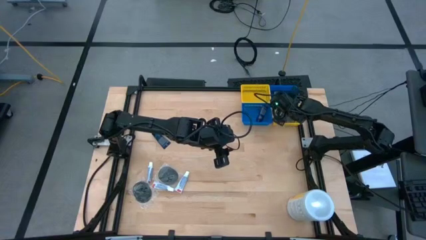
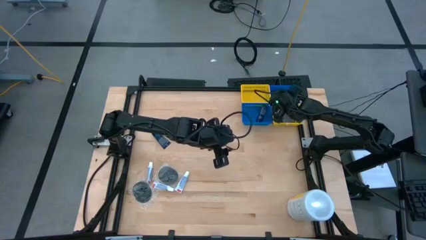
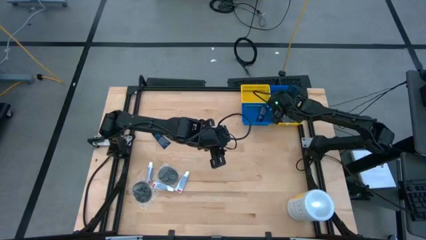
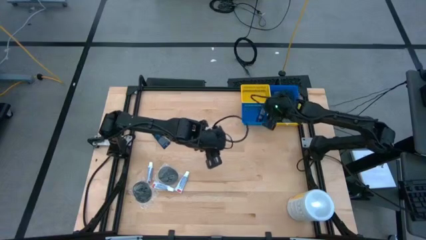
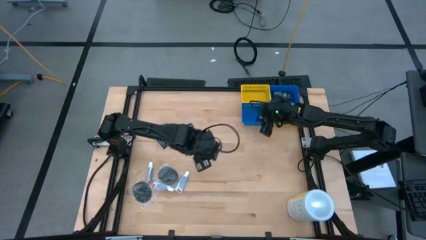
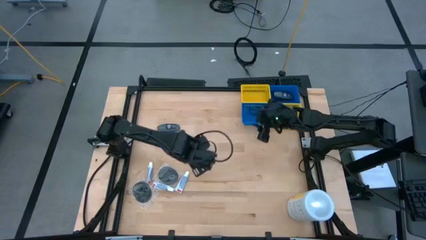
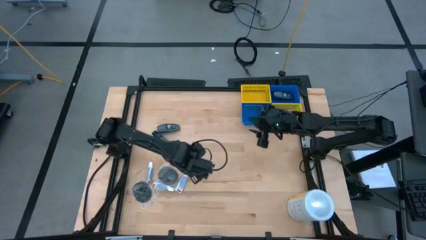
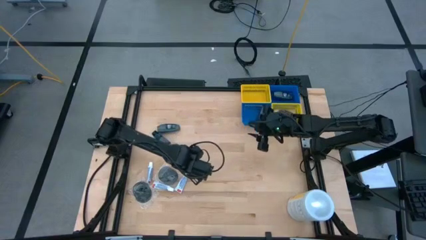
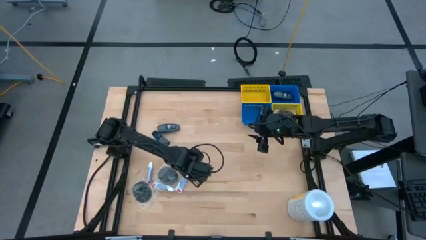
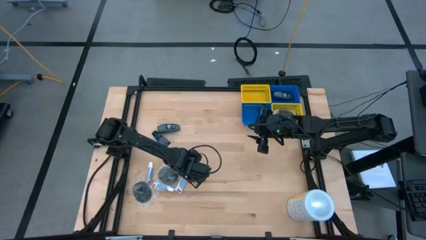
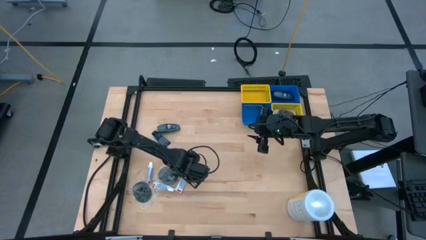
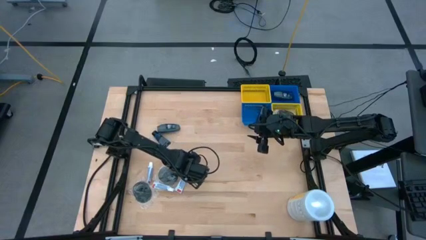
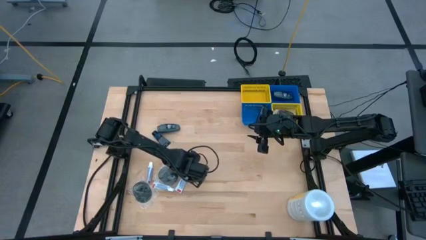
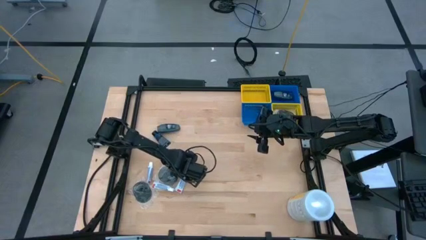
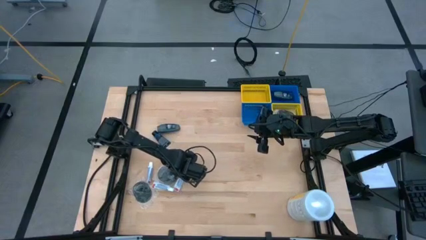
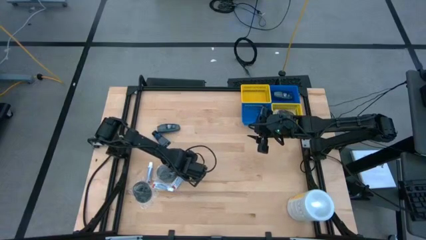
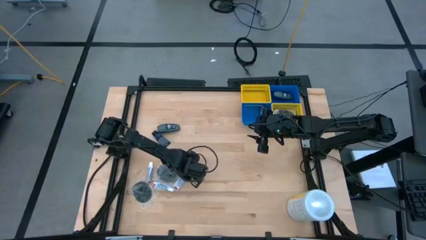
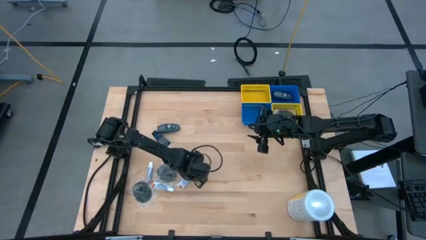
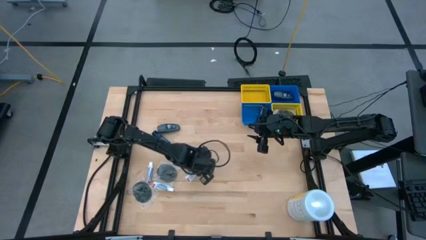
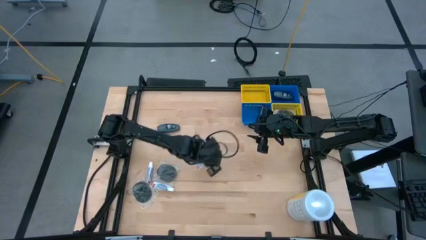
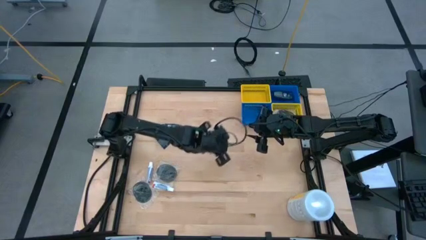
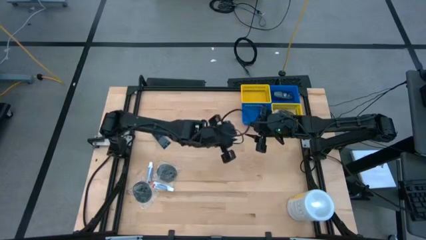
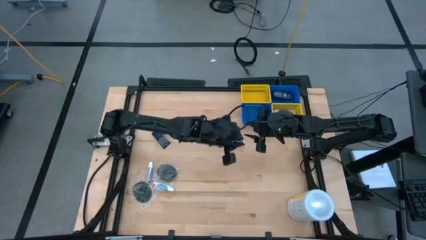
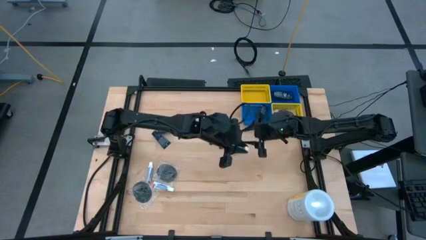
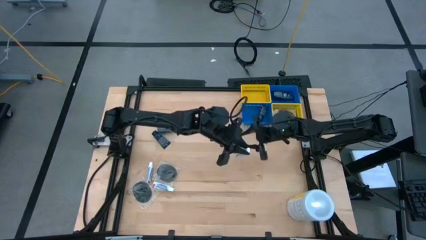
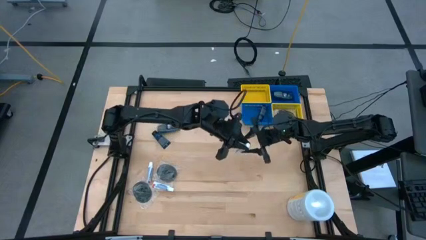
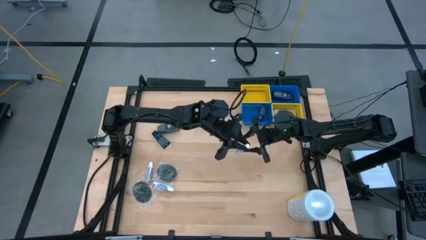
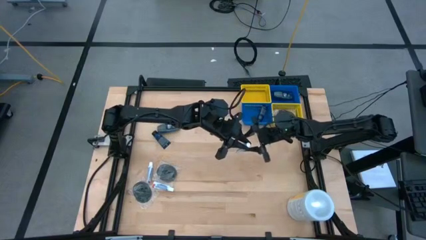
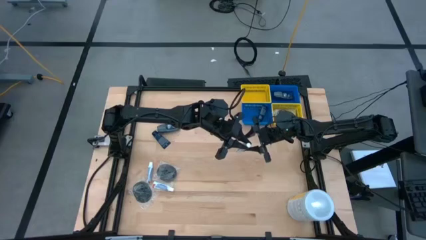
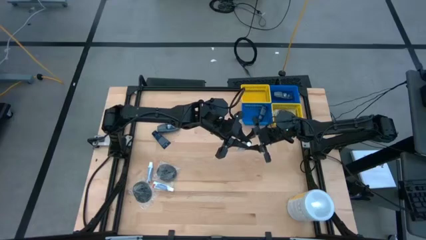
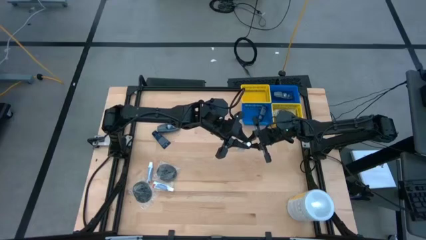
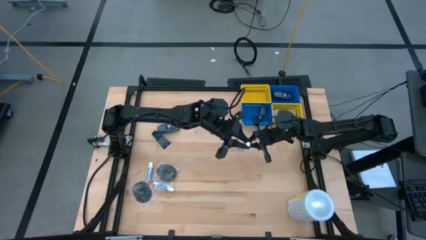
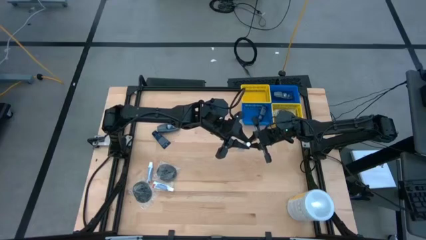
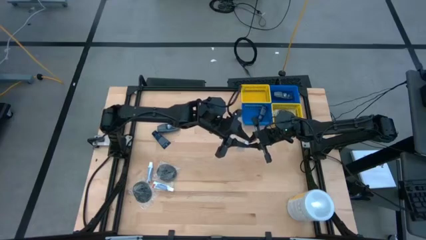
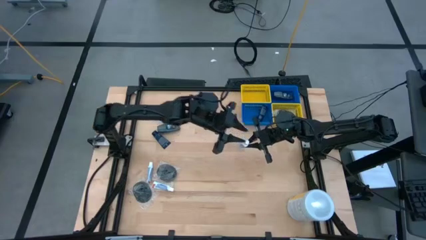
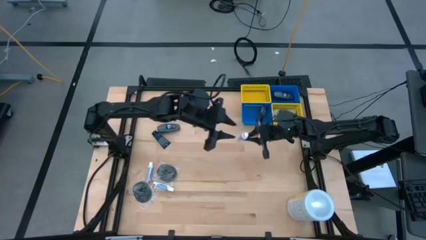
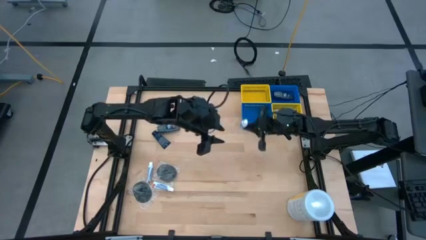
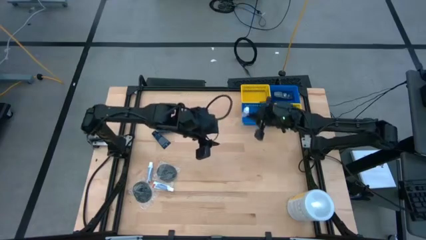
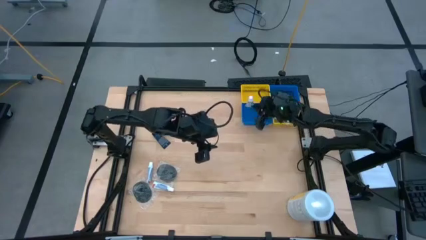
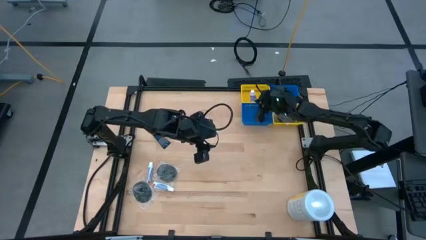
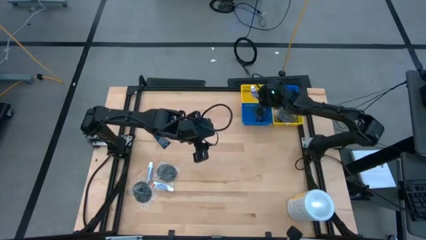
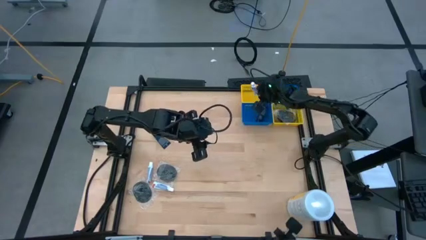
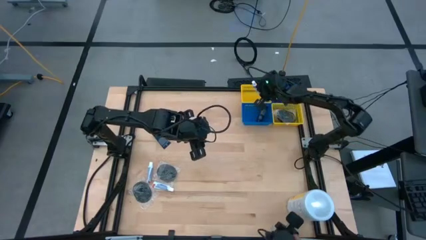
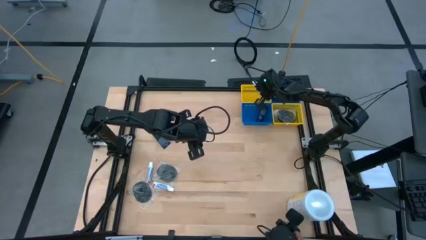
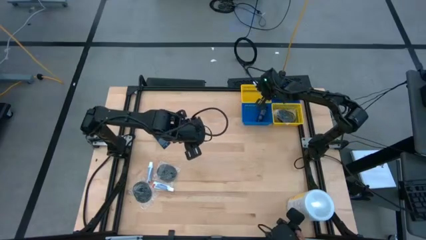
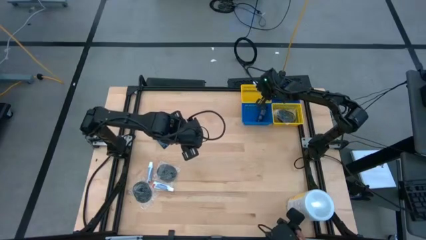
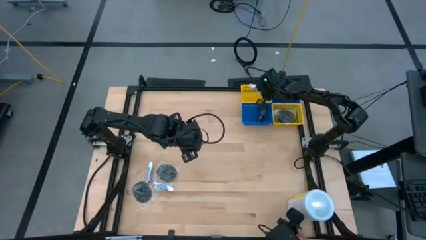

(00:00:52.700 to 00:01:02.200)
Task: Pick & Place Travel size toiletries
Put the right white toothpaste into the top yellow basket
